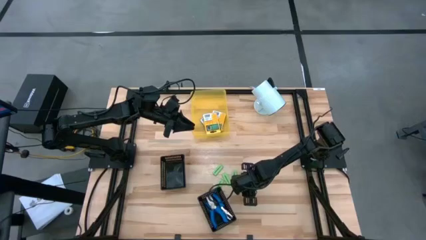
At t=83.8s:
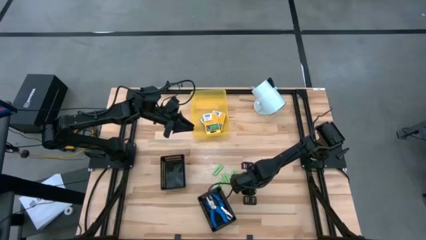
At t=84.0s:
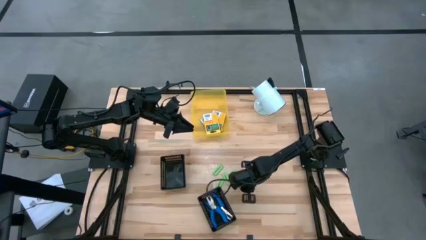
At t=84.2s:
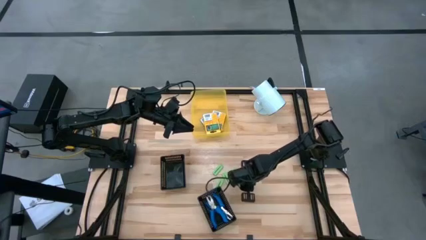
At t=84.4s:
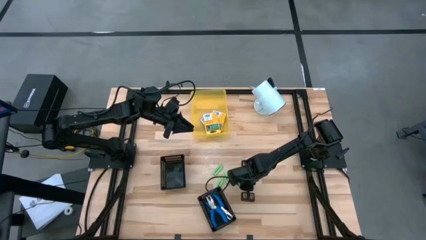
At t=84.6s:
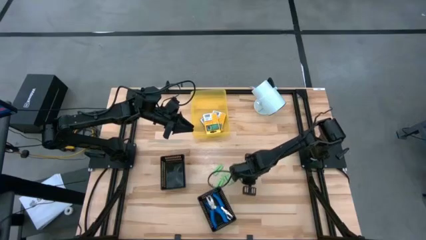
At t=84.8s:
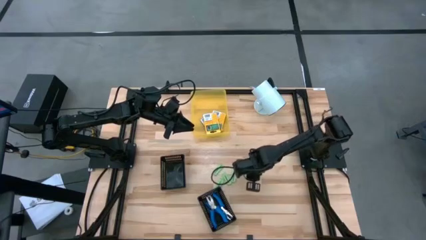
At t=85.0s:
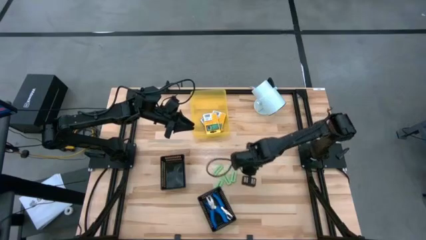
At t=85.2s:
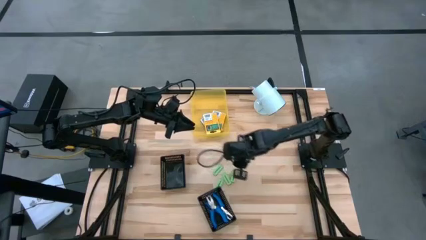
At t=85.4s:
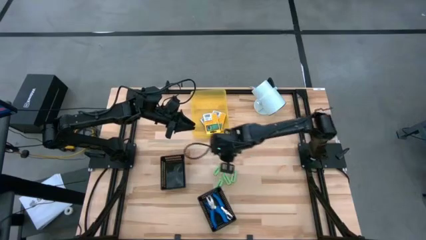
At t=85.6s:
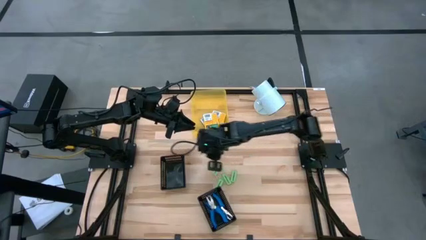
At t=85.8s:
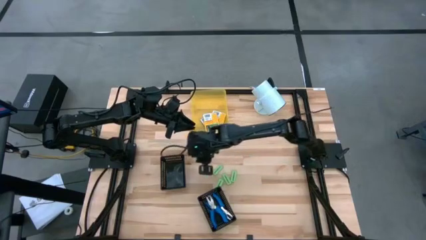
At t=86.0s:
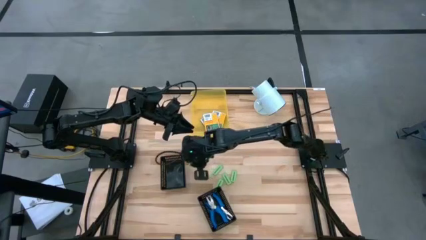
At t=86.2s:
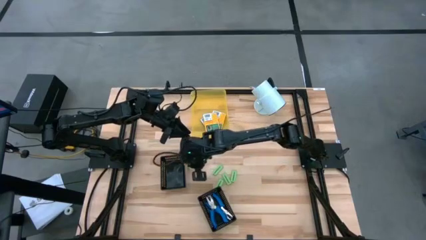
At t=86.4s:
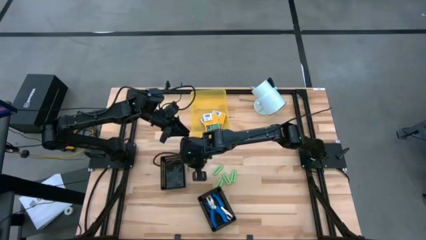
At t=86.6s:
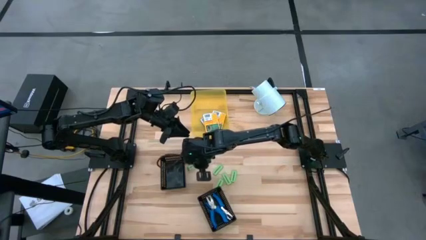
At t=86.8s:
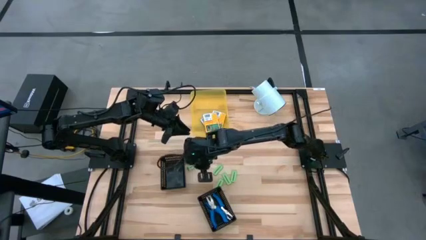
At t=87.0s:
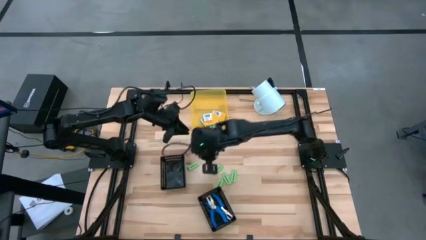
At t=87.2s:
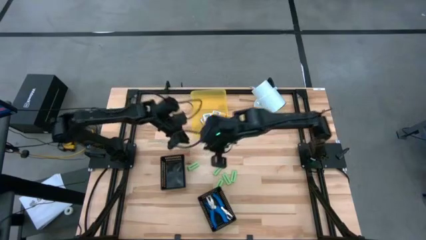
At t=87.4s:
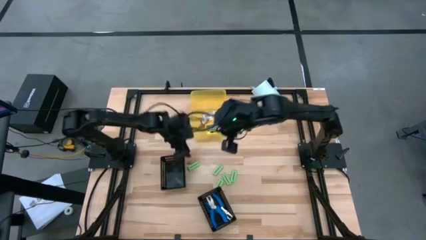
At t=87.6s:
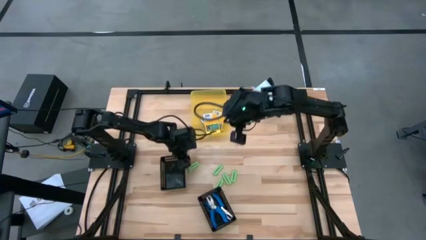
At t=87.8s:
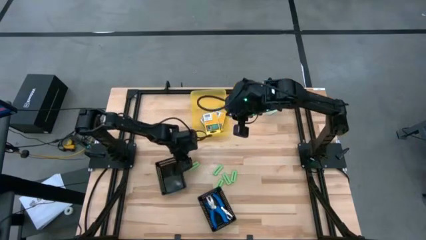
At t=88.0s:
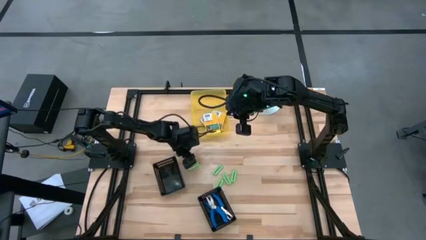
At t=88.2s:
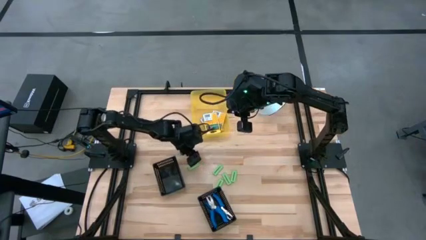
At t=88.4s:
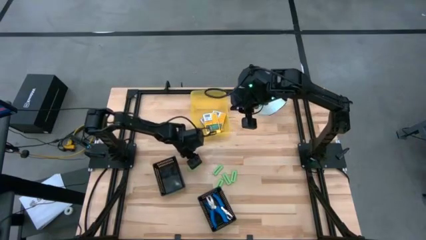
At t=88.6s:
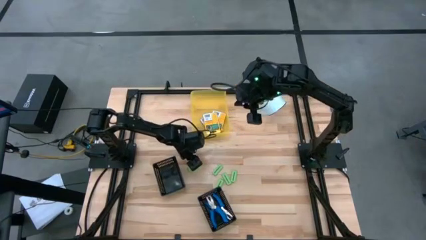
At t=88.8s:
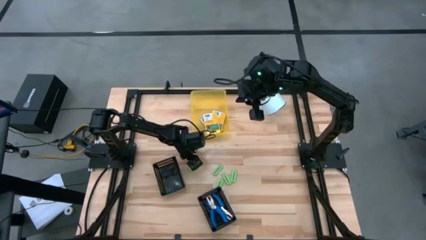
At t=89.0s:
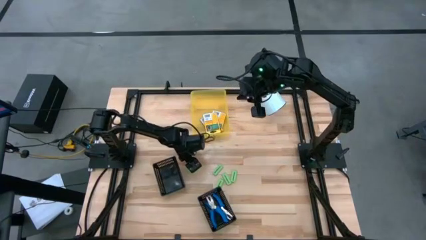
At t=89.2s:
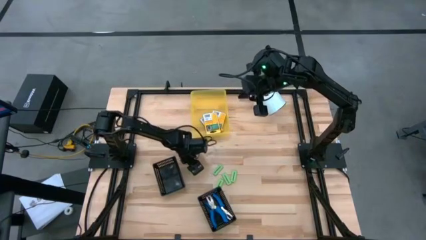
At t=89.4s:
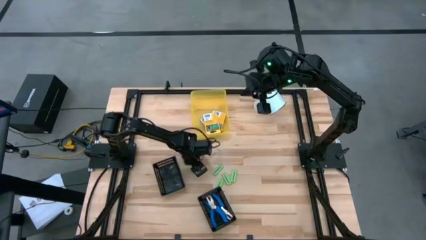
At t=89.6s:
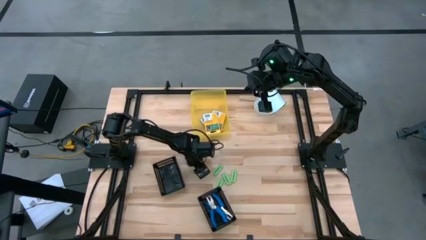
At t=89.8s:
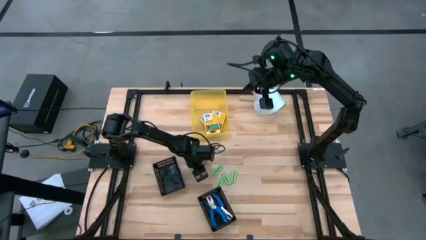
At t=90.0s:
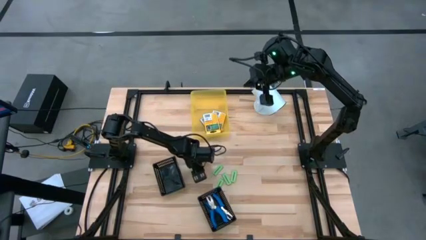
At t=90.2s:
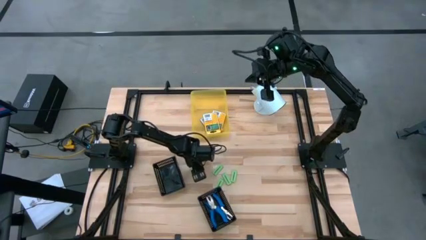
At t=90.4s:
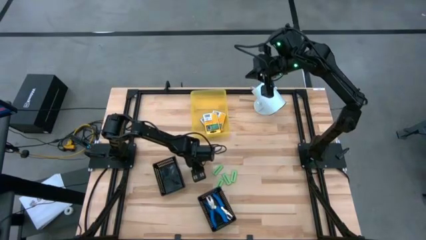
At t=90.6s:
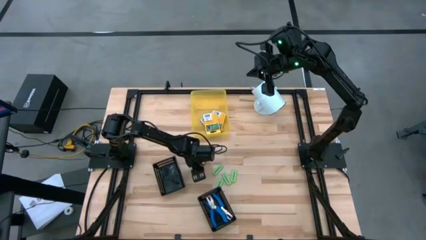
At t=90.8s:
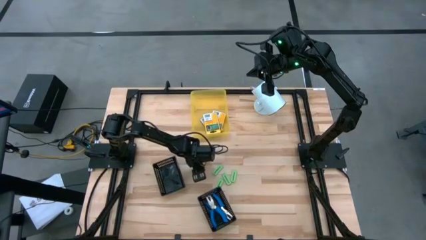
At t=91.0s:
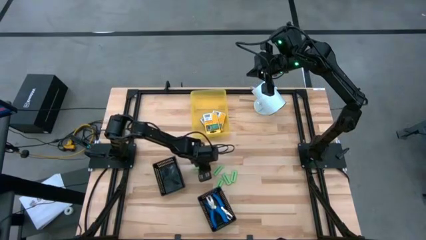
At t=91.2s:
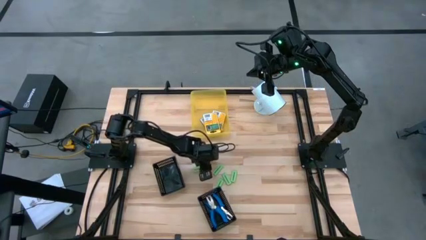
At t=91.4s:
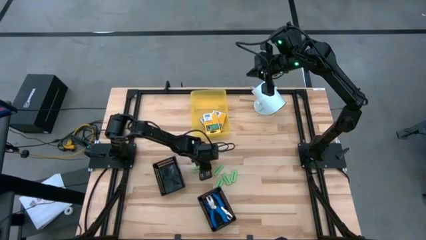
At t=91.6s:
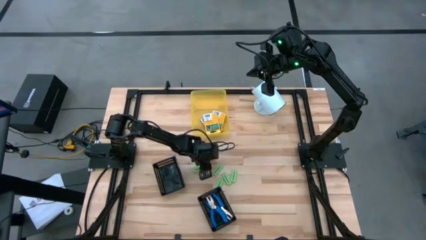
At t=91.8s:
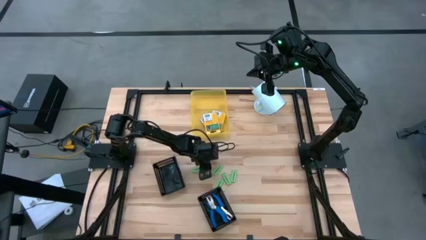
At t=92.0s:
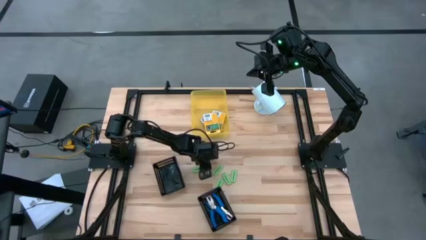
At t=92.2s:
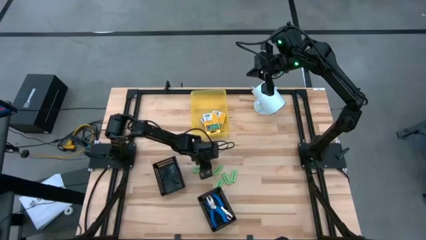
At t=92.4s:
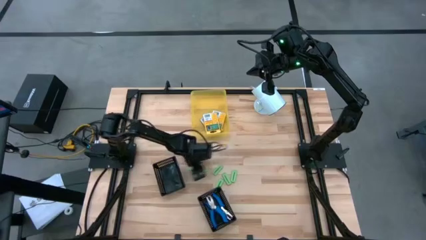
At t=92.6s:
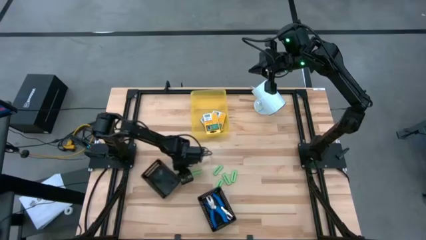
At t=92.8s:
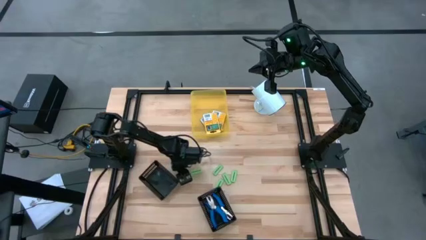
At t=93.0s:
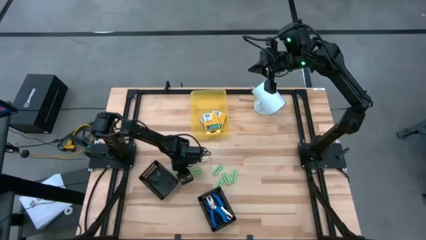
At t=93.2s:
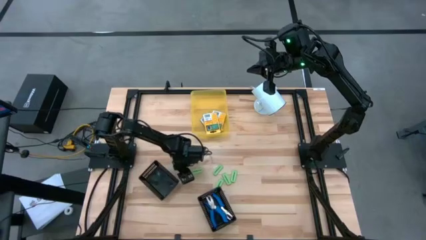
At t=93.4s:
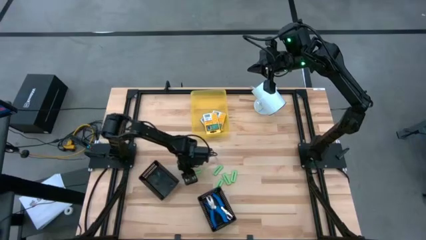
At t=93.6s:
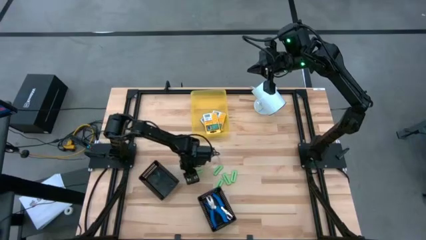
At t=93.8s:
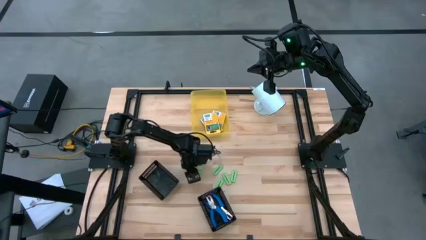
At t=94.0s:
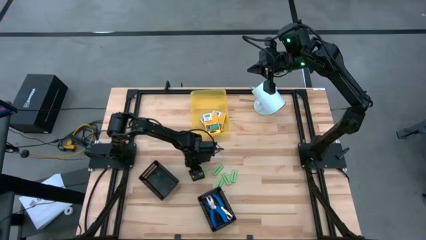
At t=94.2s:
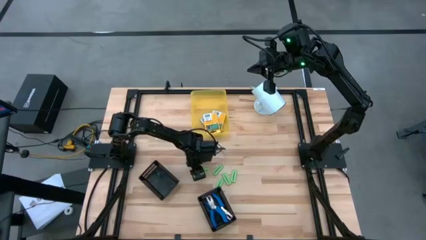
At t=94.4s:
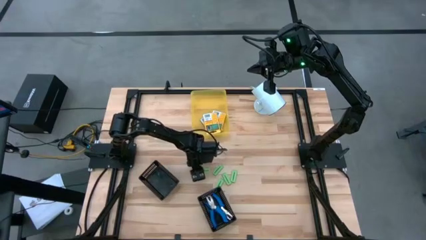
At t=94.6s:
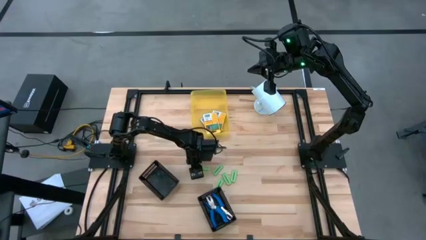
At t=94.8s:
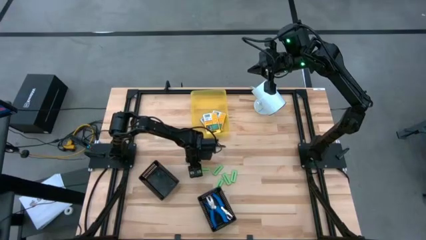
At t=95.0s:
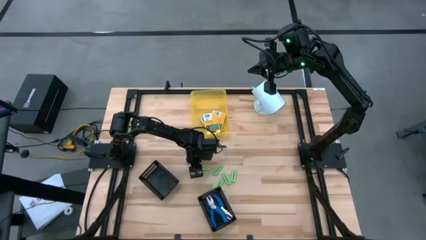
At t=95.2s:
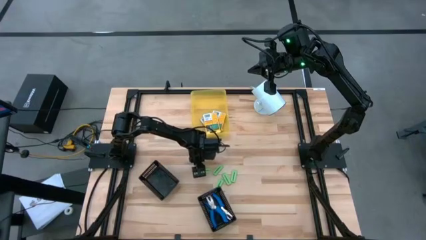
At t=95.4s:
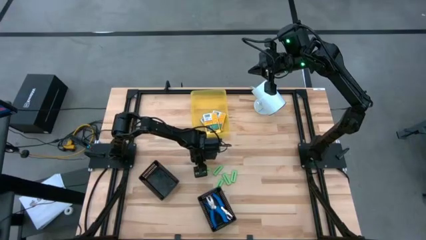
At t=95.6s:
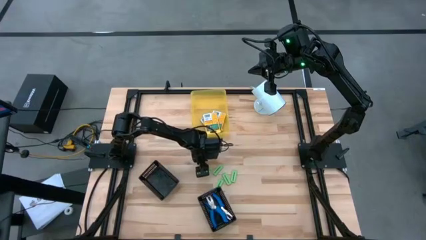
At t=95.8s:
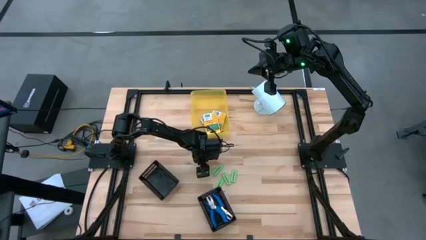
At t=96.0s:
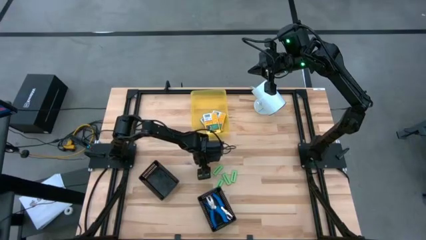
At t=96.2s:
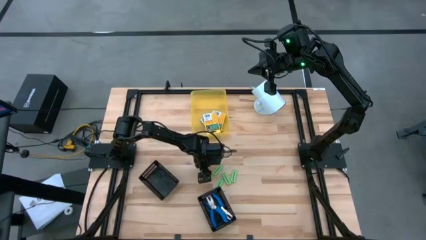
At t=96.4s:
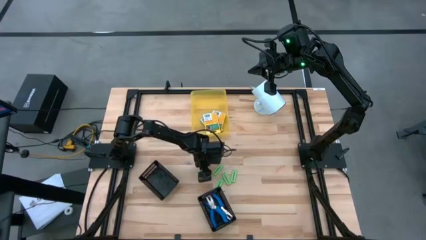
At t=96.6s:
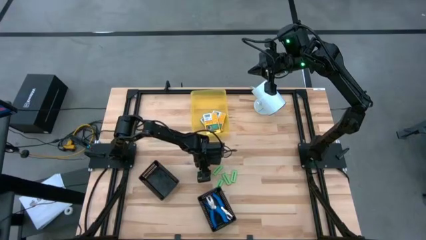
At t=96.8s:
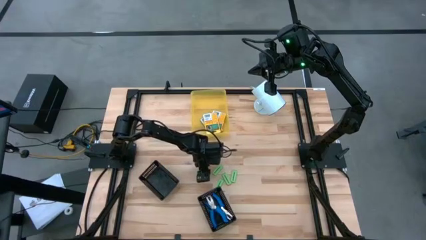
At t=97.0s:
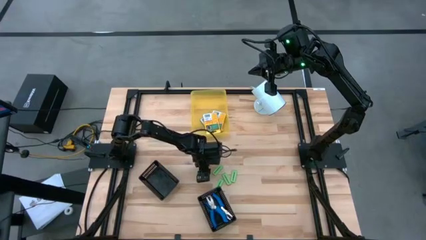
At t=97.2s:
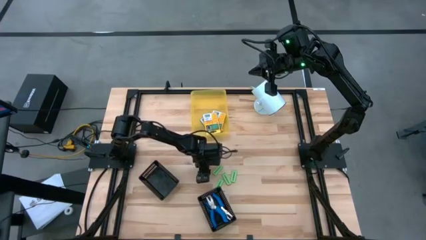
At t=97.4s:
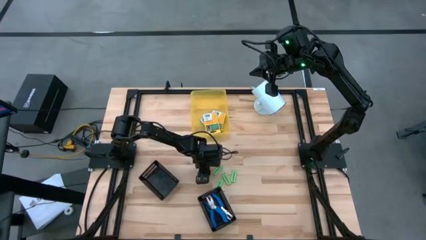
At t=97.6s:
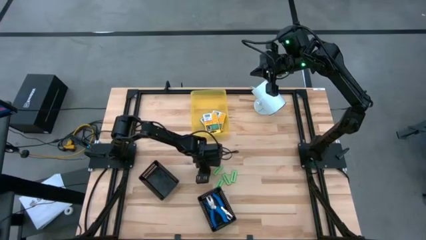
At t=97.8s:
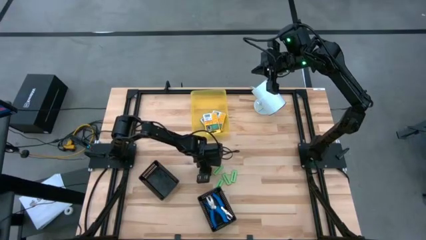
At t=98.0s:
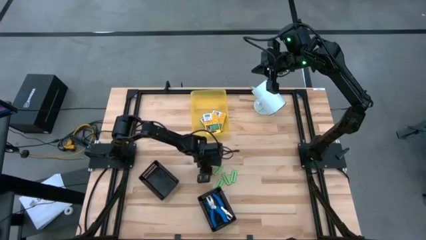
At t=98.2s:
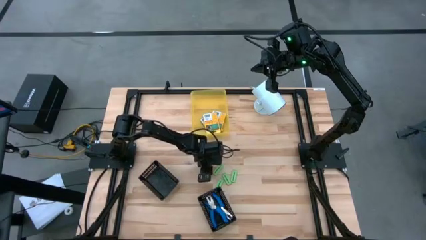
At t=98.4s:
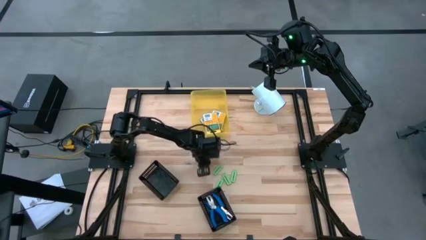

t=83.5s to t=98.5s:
Task: Pick & Place School Supplies
Put the green eraser into the left black bin
